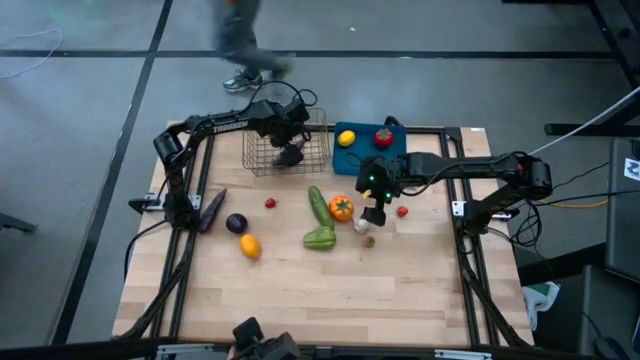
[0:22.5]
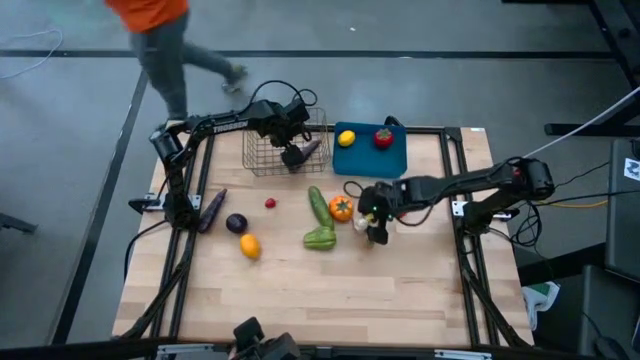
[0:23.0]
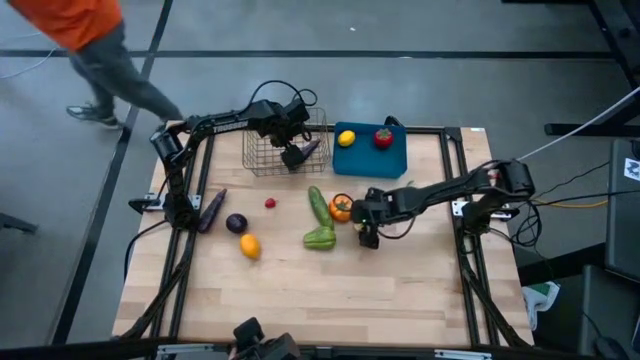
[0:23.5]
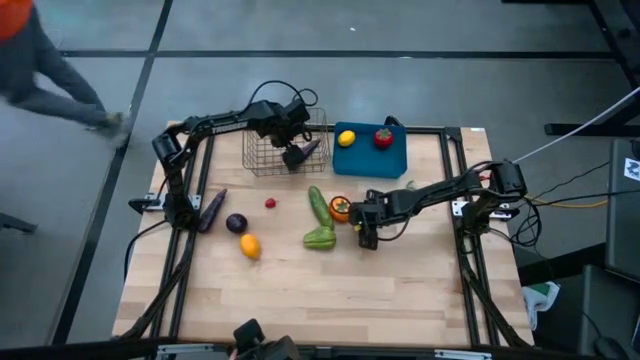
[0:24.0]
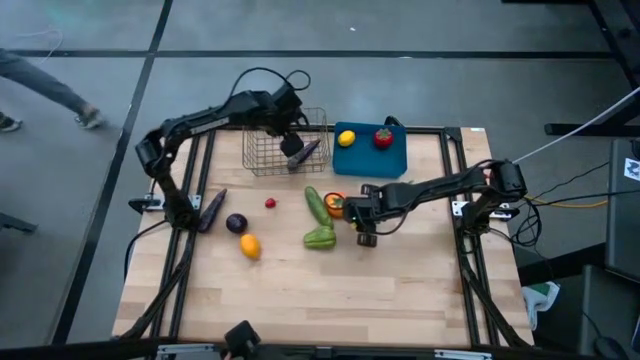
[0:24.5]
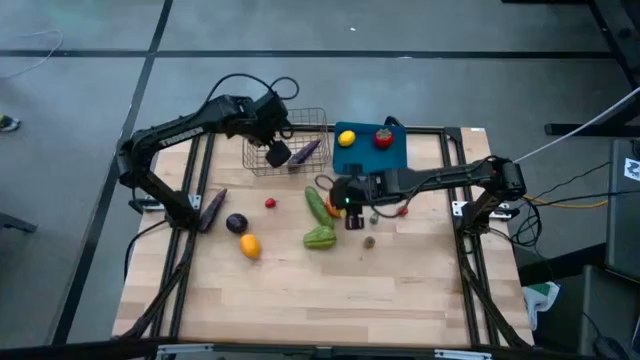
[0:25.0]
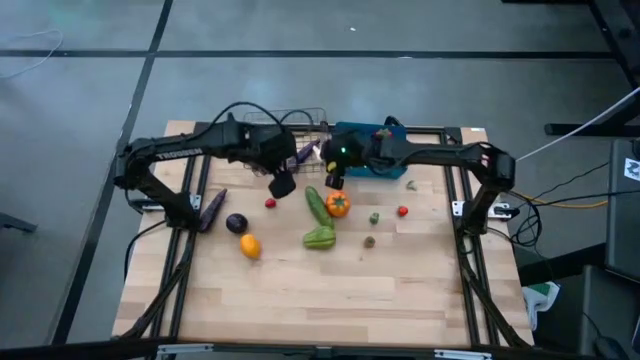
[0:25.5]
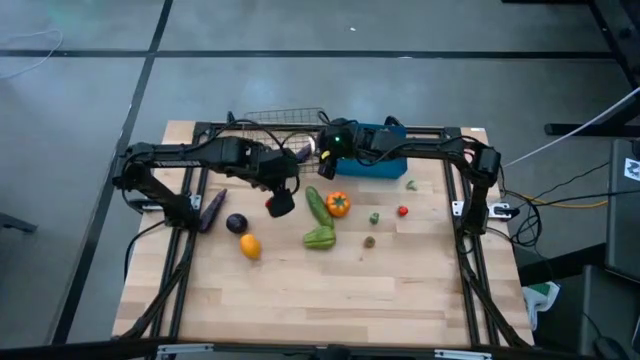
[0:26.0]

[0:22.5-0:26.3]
Task: Sort produce into baskets
Put the garlic into the wire basket

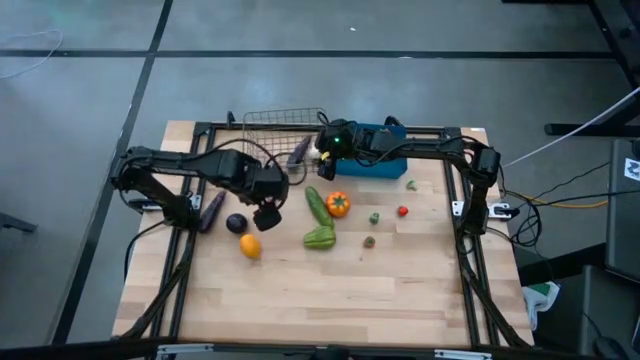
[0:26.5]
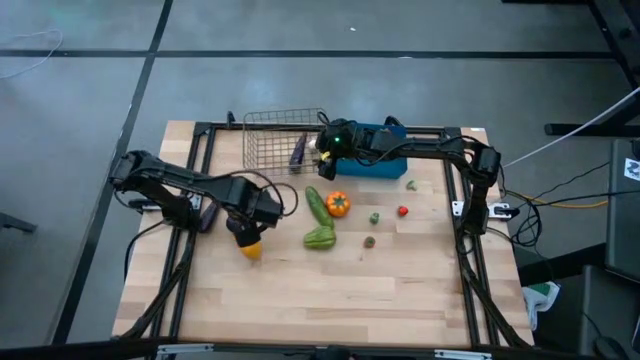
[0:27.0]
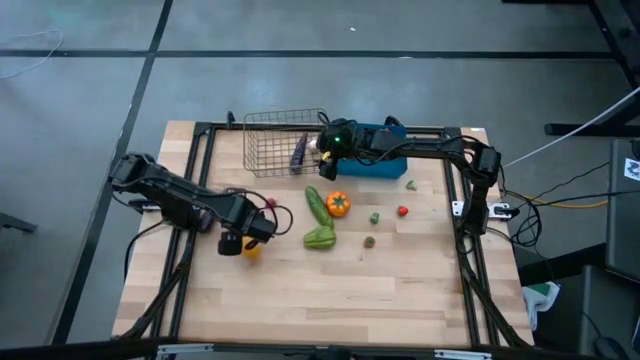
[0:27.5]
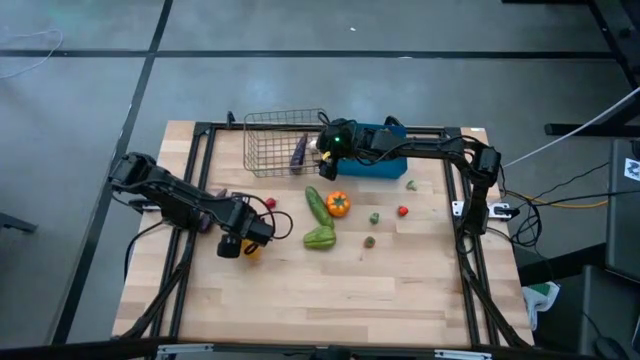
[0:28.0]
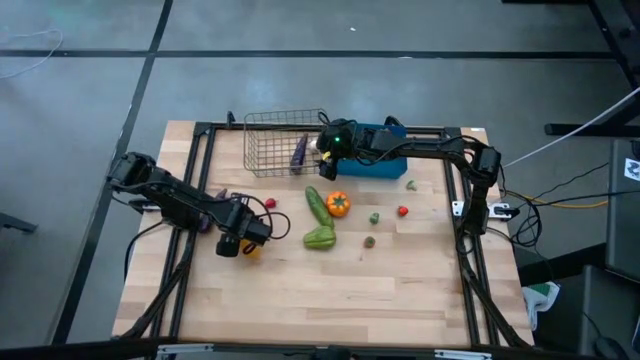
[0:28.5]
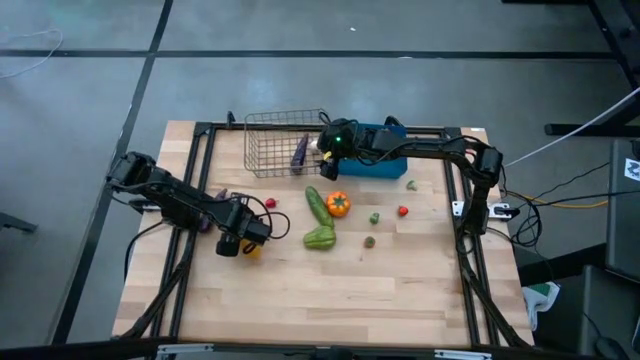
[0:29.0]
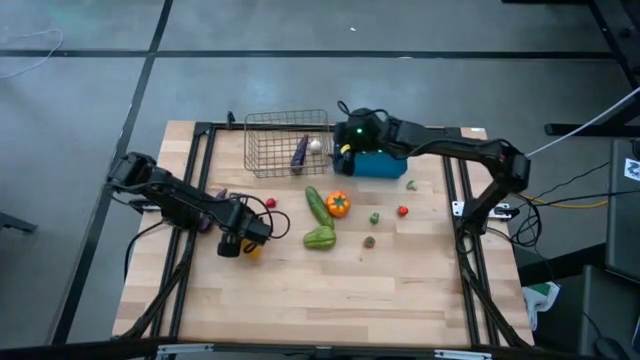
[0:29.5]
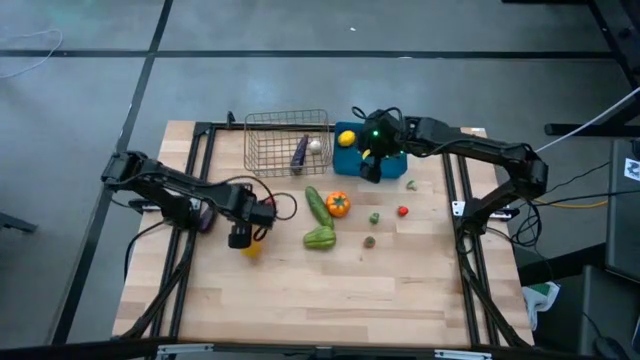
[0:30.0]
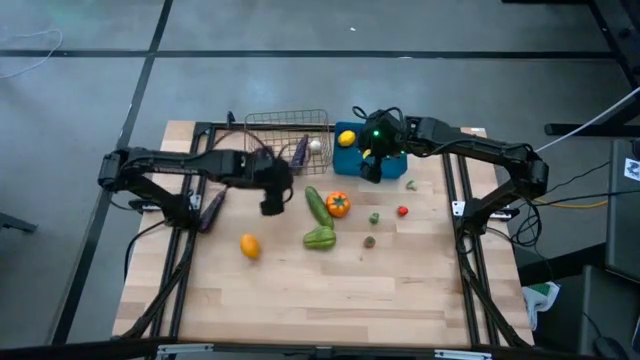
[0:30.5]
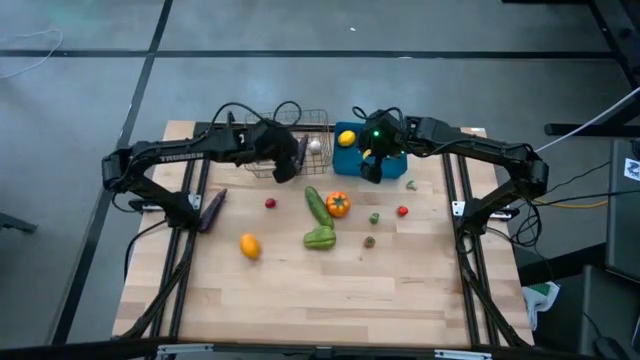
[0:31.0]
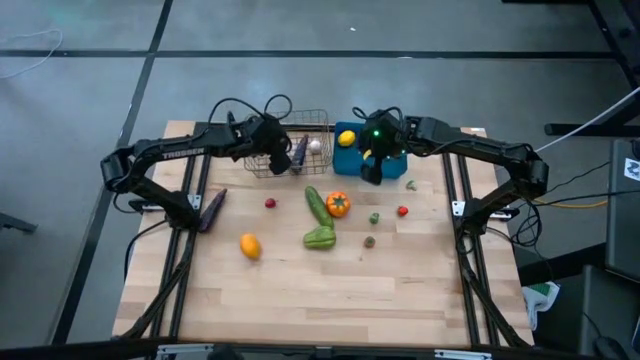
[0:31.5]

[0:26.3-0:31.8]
Put the onion into the wire basket

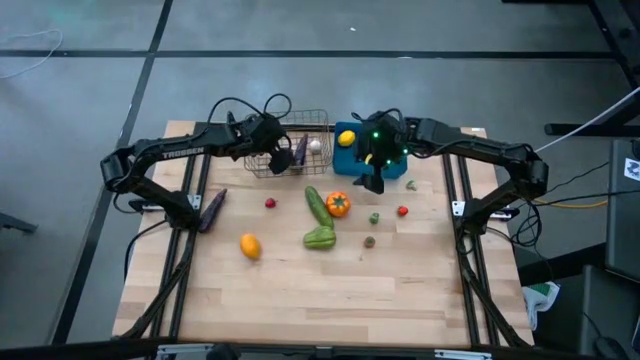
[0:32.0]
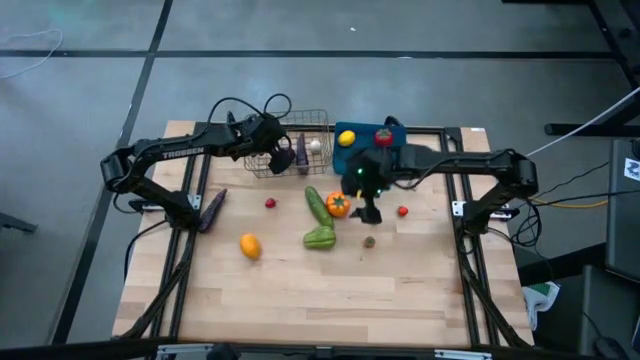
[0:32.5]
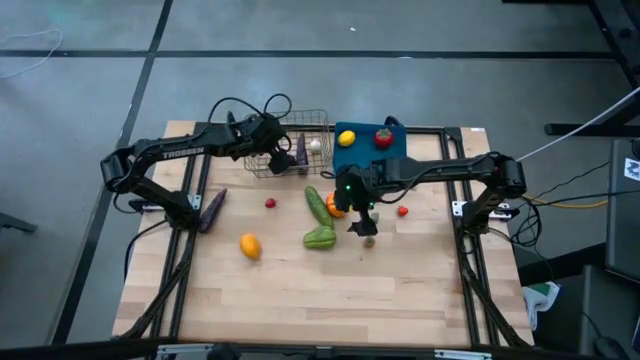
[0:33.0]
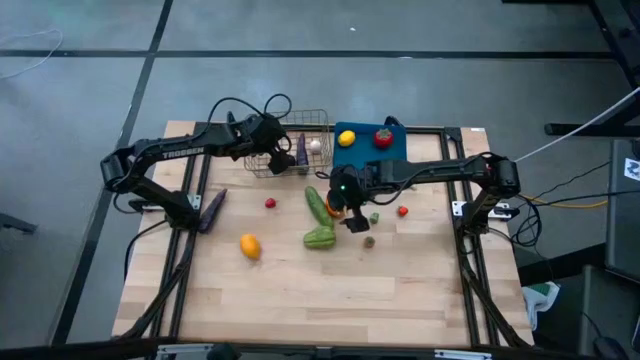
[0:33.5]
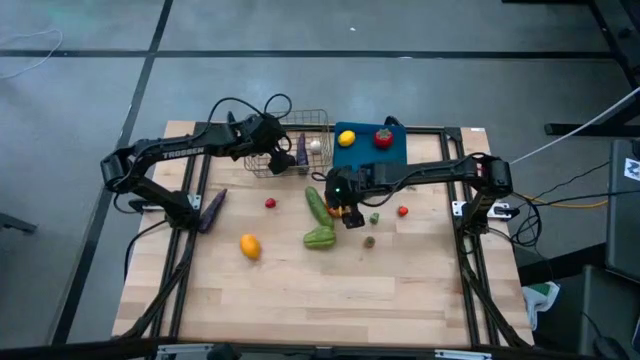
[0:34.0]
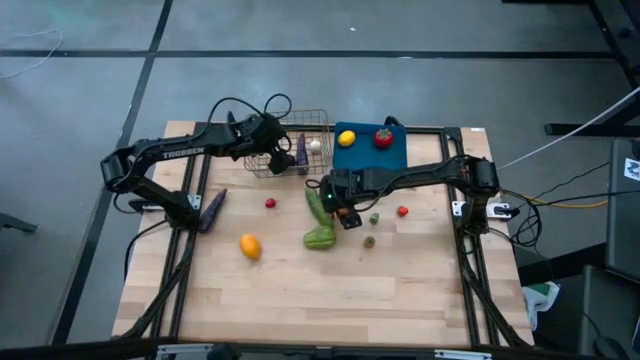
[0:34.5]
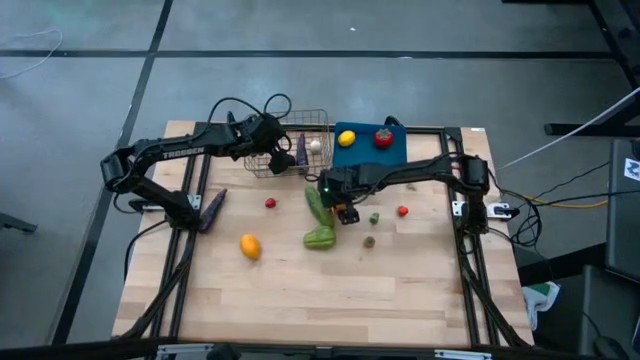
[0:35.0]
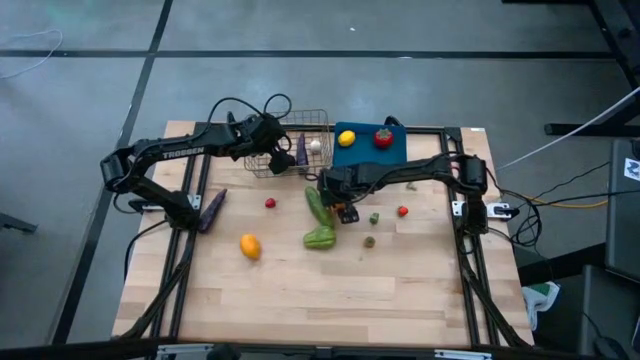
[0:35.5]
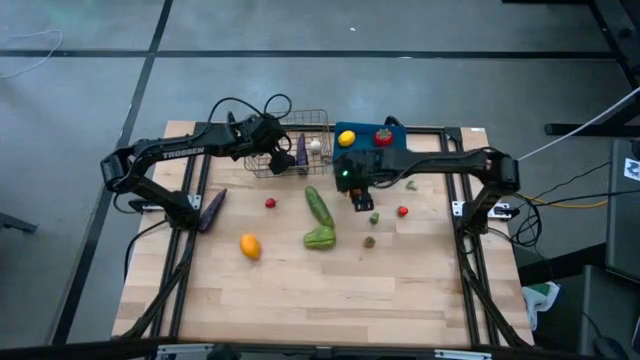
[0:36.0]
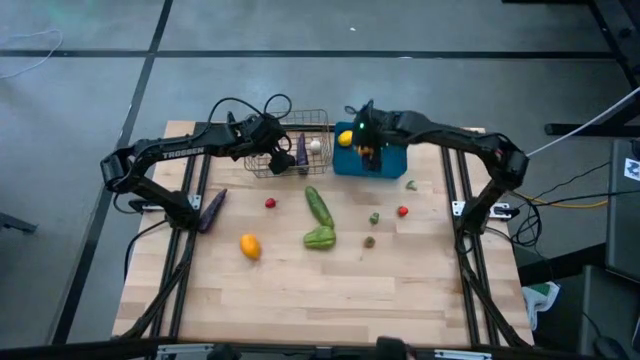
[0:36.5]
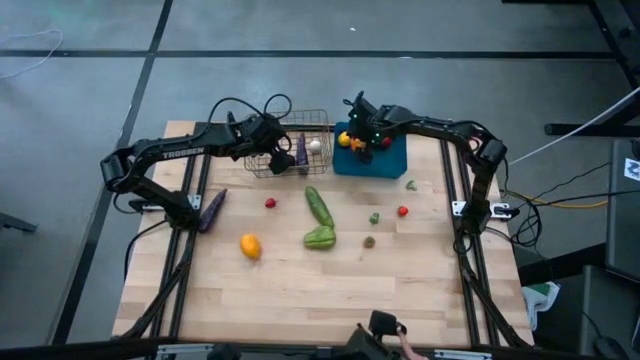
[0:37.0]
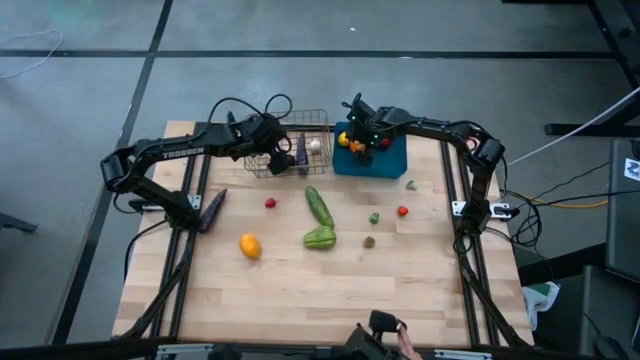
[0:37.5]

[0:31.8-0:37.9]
Put the large orange tomato into the blue bin

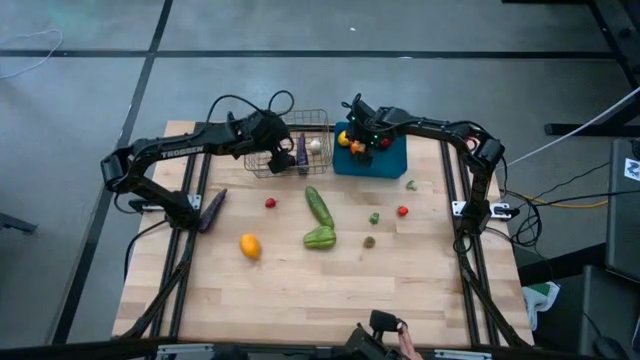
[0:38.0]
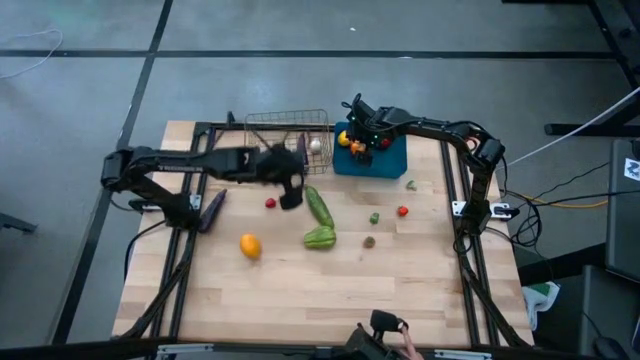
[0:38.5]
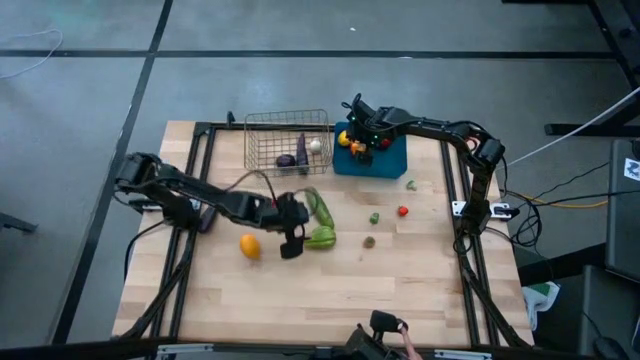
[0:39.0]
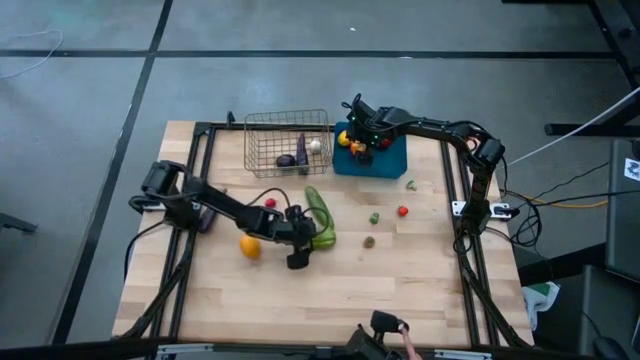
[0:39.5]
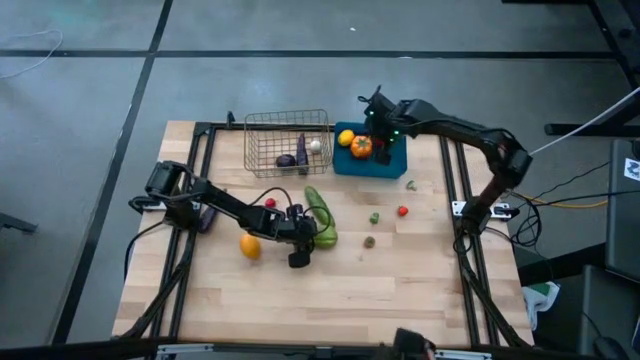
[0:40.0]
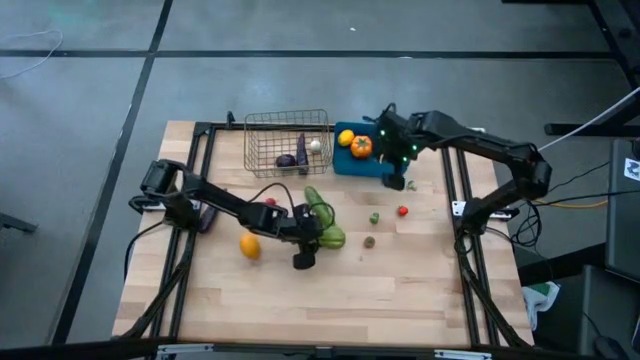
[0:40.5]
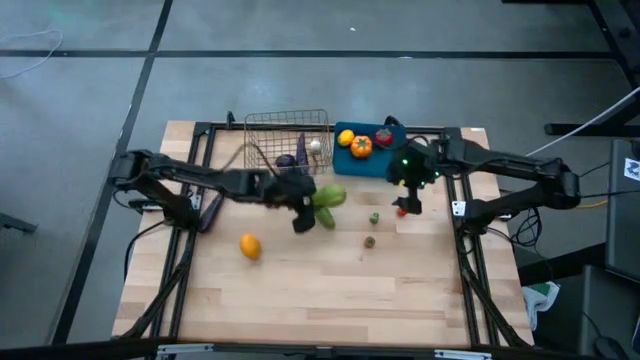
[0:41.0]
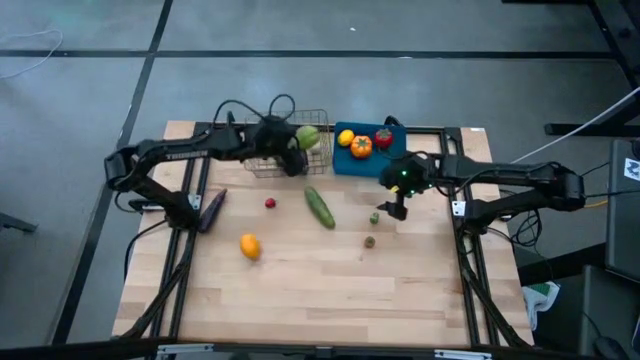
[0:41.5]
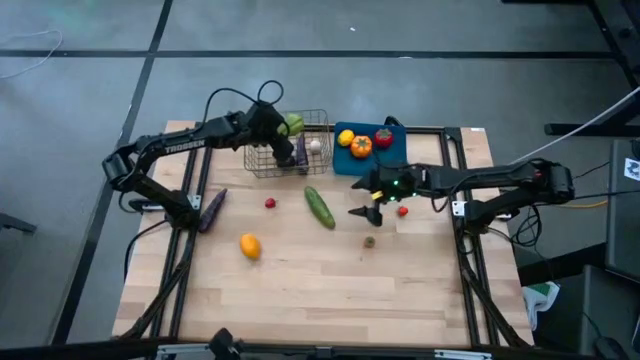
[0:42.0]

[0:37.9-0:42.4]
Put the chayote into the wire basket

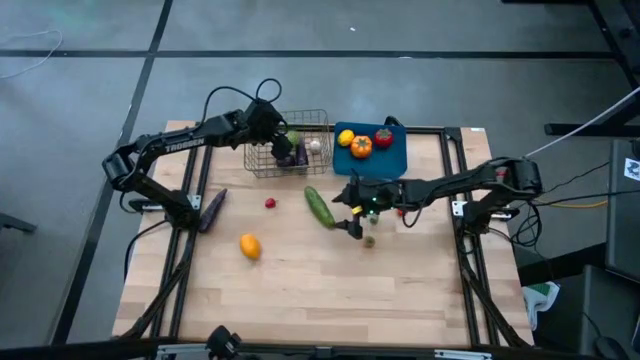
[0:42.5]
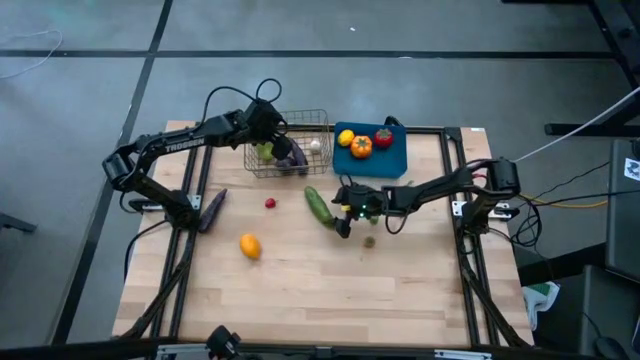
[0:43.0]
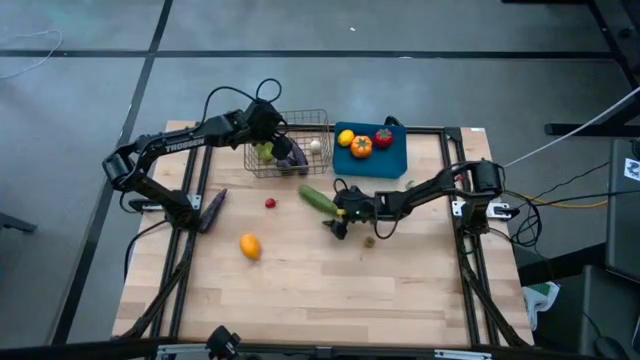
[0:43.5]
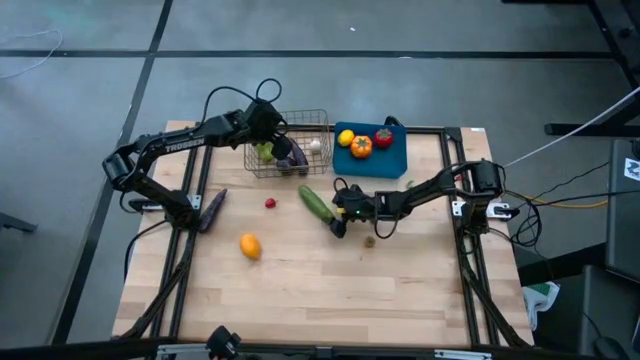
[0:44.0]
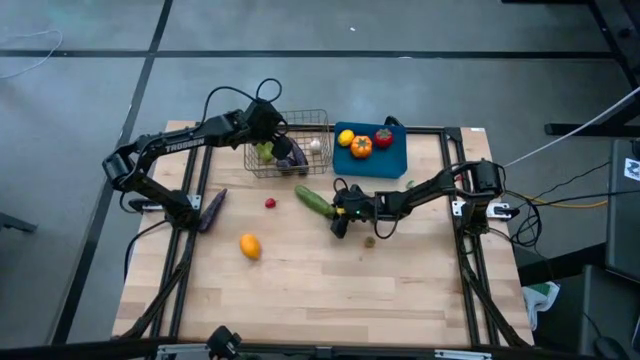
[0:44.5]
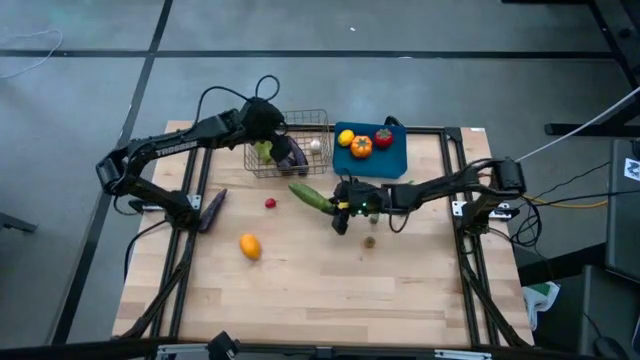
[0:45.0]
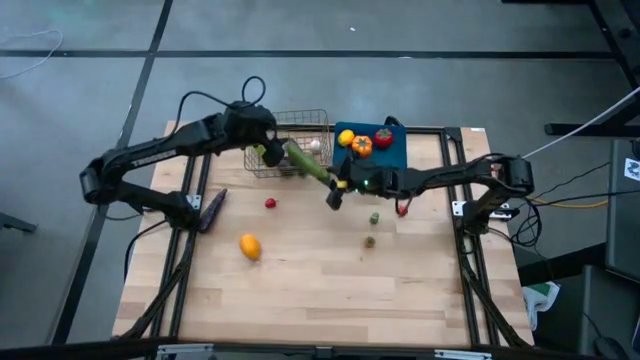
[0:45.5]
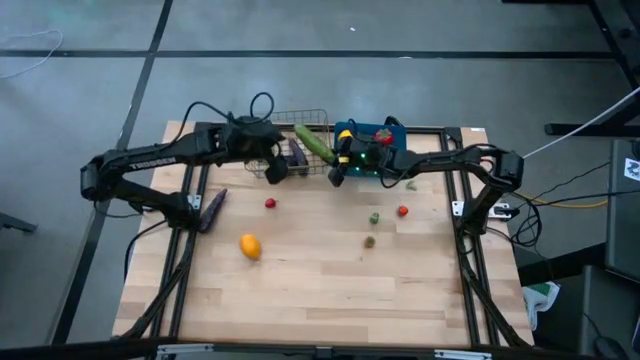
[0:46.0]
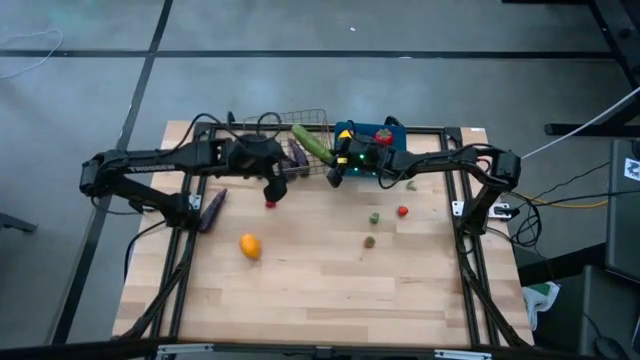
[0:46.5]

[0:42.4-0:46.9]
Put the cucumber into the wire basket
